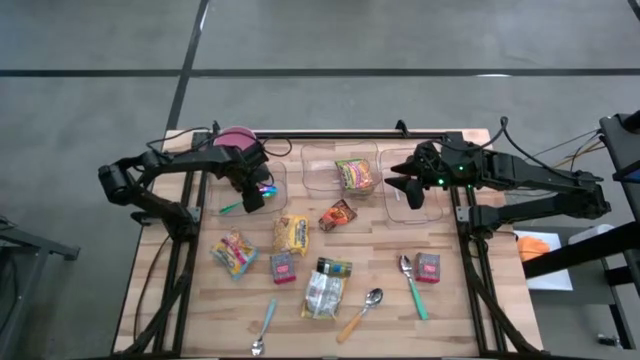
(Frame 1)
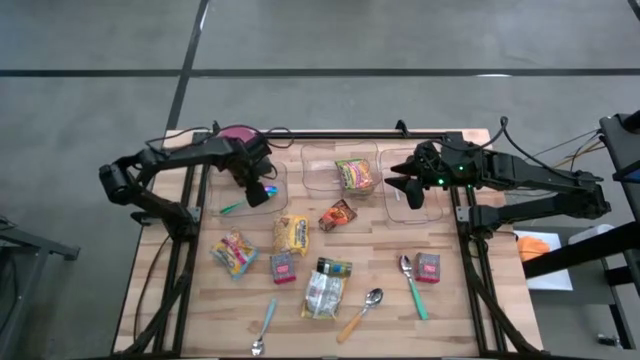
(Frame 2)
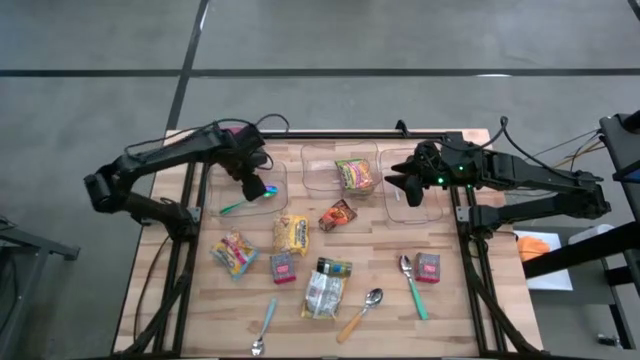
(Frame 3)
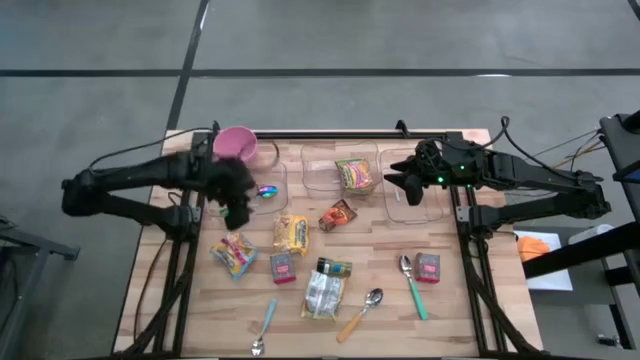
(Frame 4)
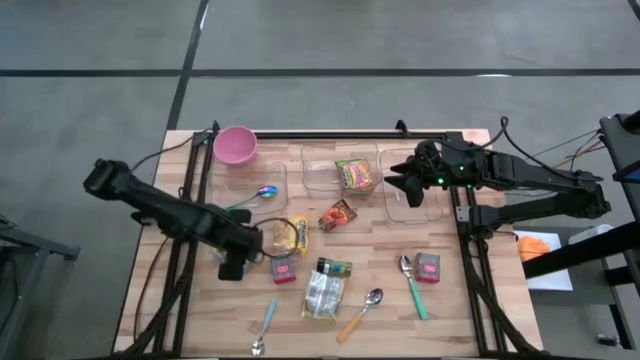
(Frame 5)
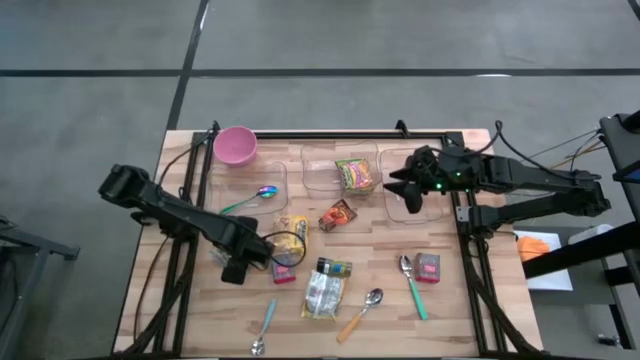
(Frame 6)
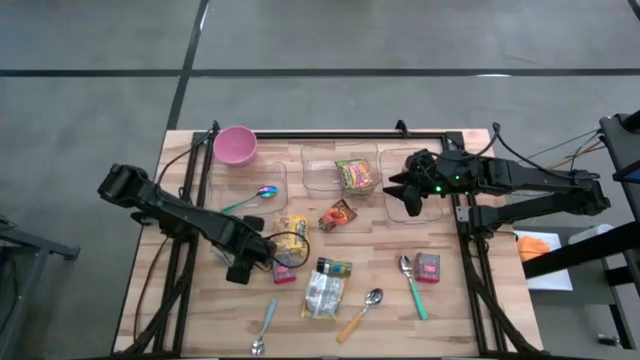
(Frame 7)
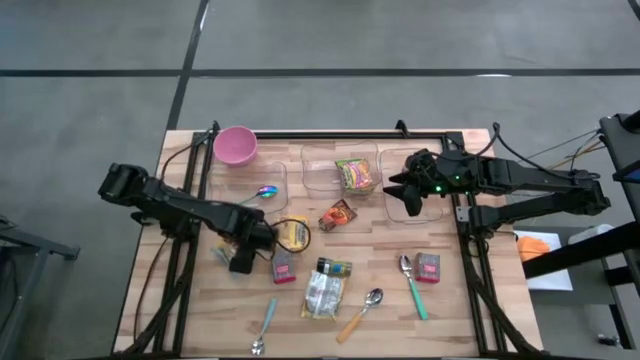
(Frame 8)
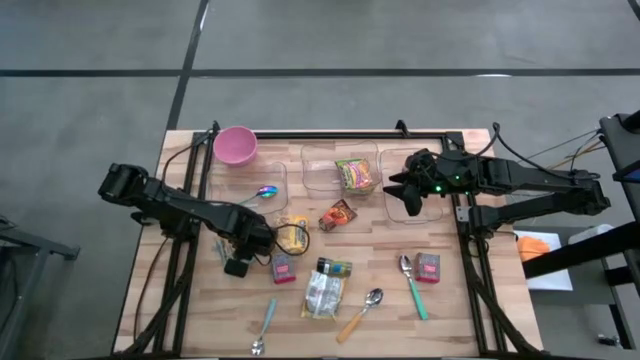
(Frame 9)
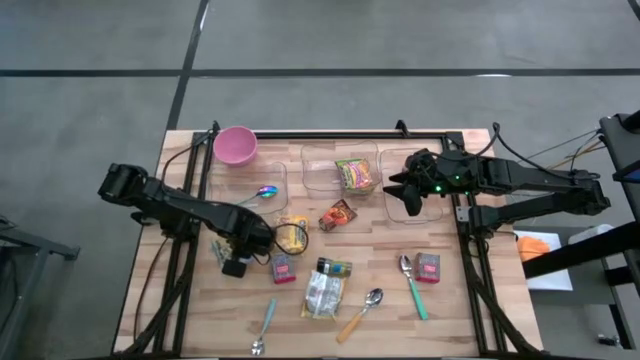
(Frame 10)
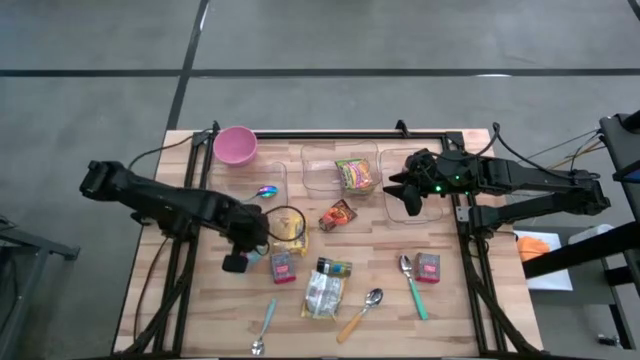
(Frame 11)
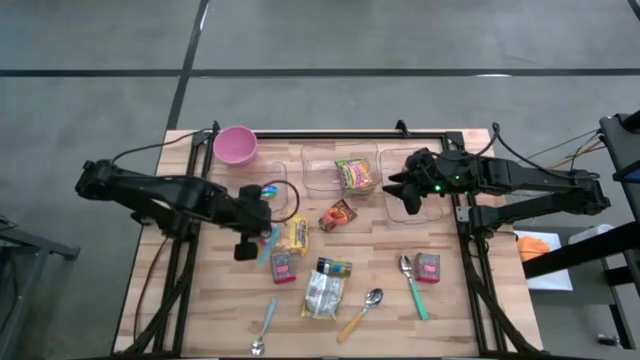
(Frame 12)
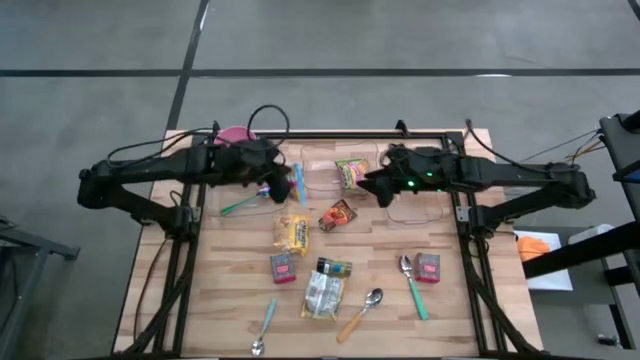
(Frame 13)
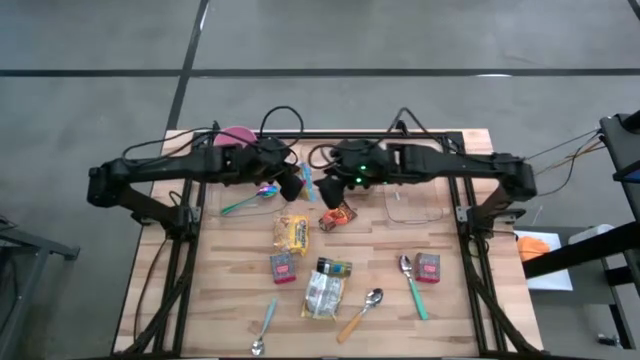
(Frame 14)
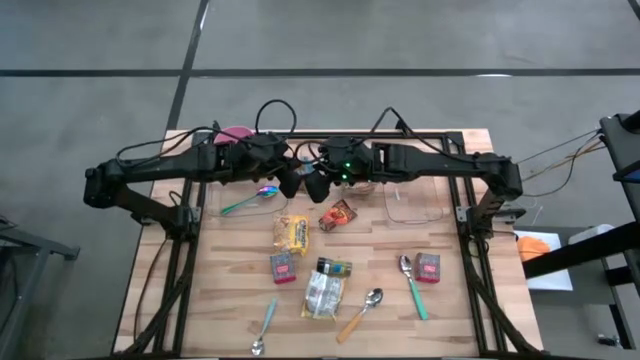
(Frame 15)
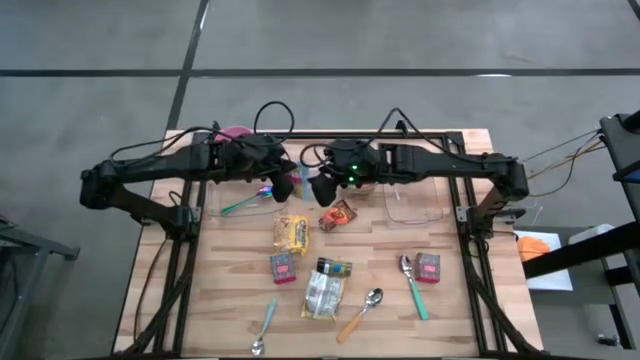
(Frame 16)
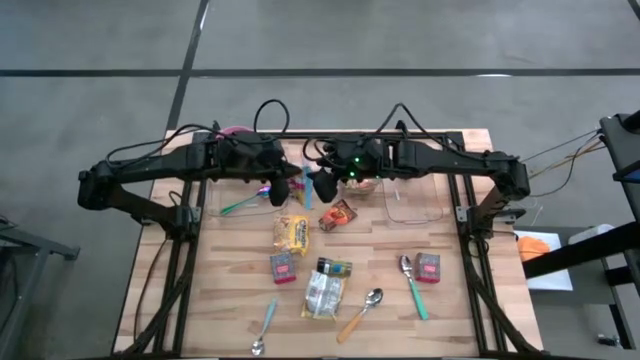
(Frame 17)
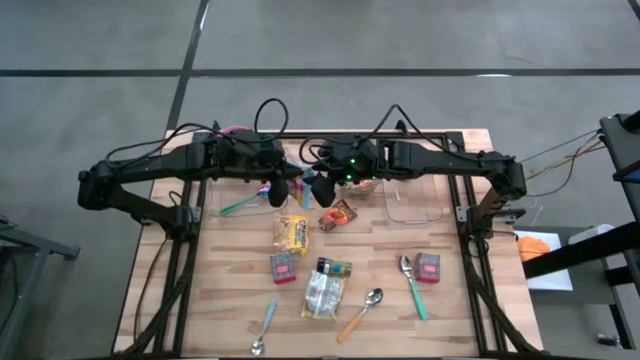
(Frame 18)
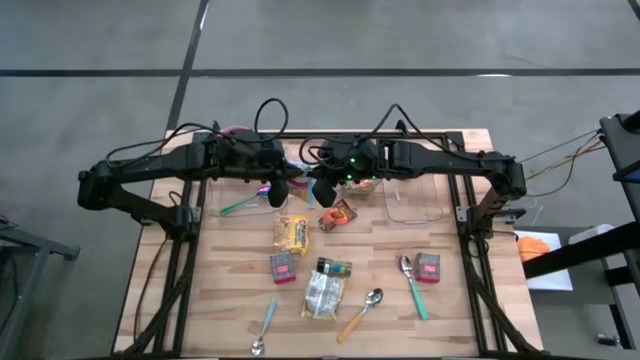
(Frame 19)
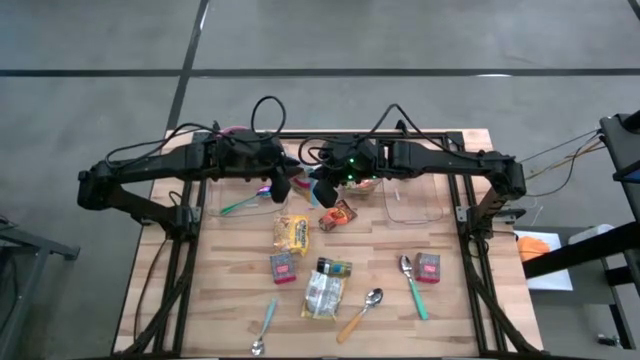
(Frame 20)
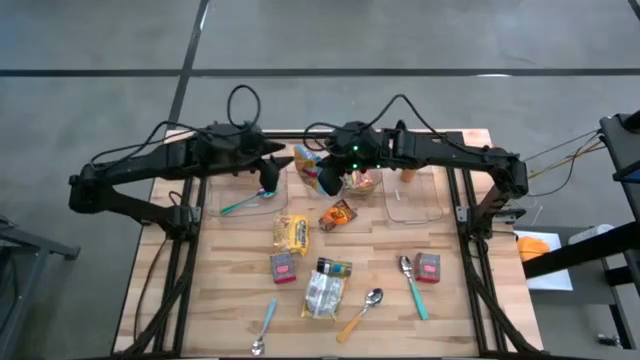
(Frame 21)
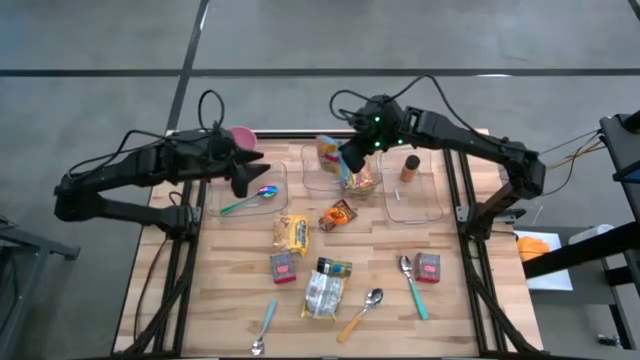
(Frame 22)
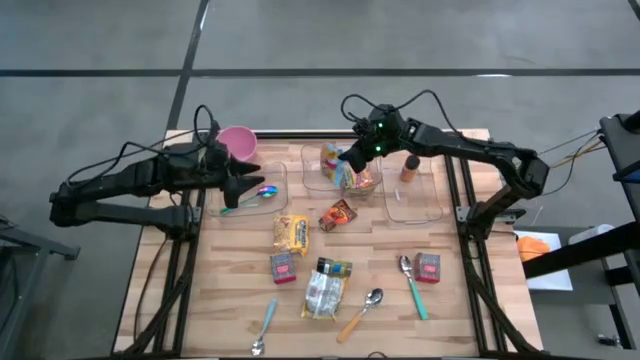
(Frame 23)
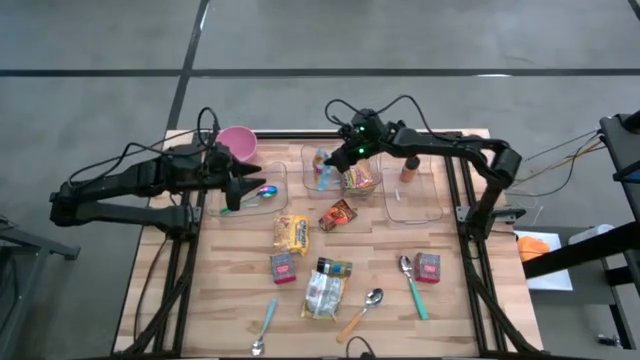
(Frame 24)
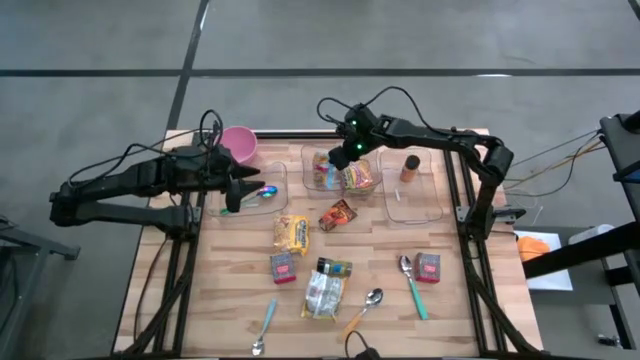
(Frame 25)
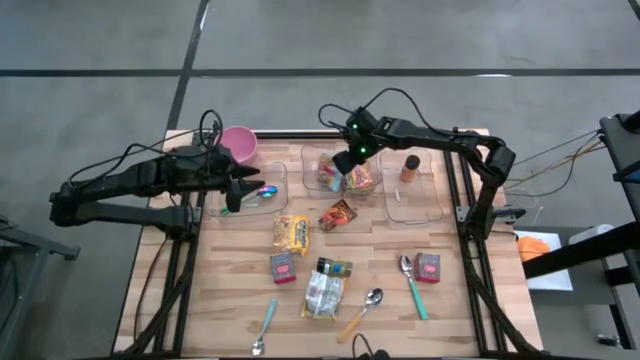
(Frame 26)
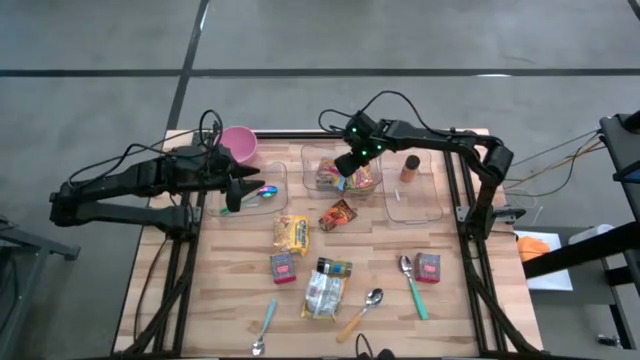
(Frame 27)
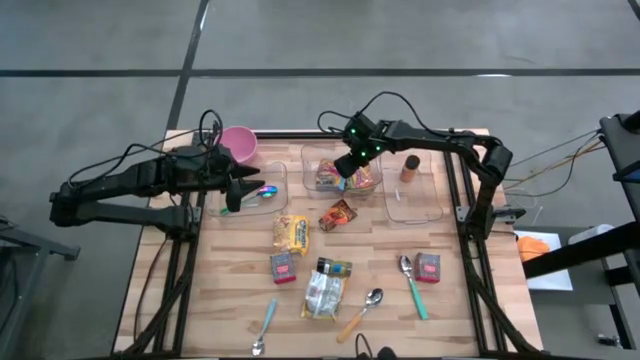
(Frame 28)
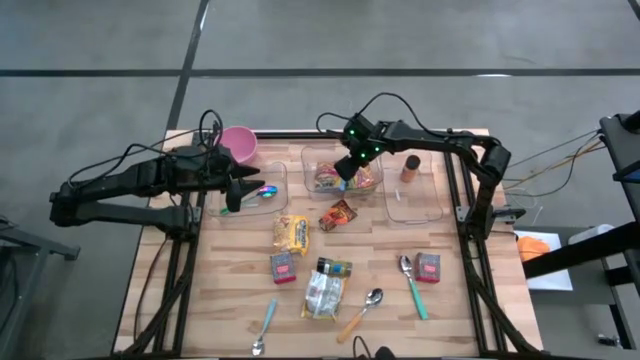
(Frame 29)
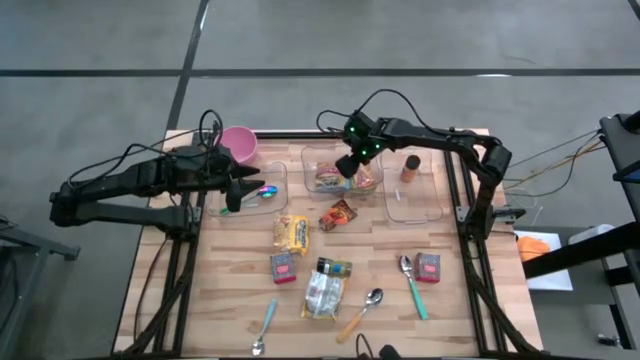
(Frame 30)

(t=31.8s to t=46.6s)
Put the blue noodle pack into the middle transparent bin

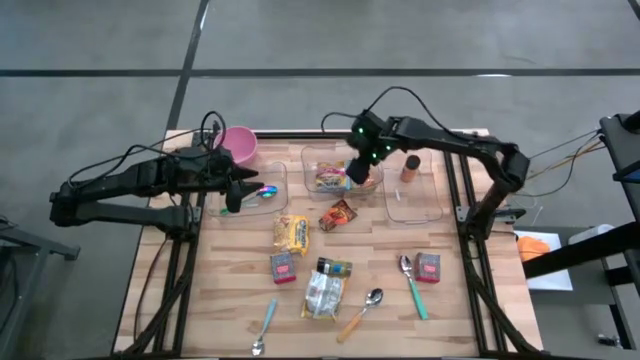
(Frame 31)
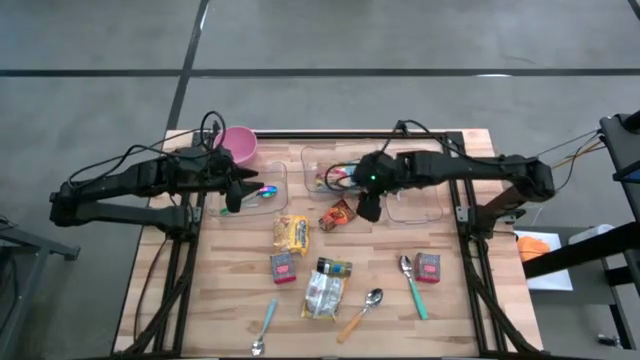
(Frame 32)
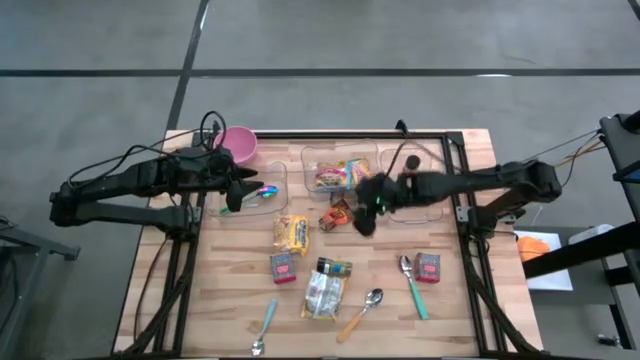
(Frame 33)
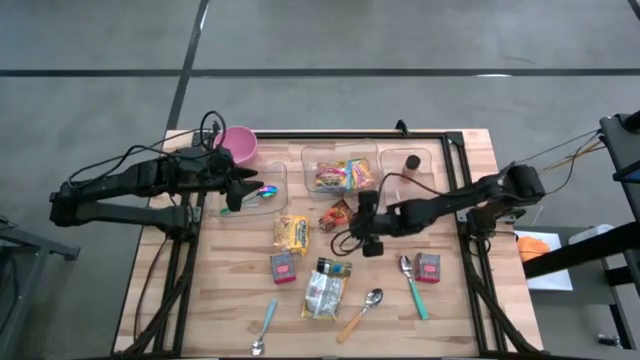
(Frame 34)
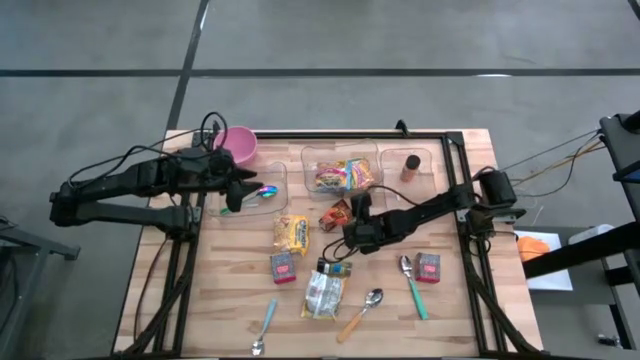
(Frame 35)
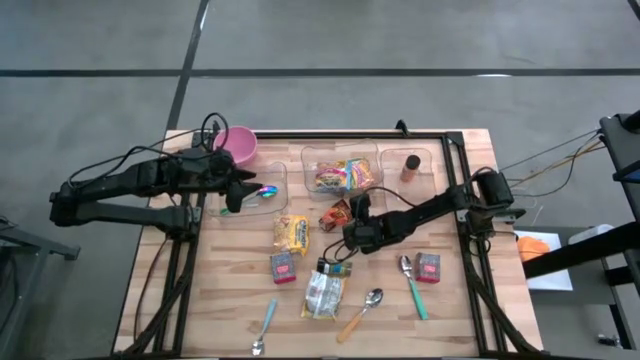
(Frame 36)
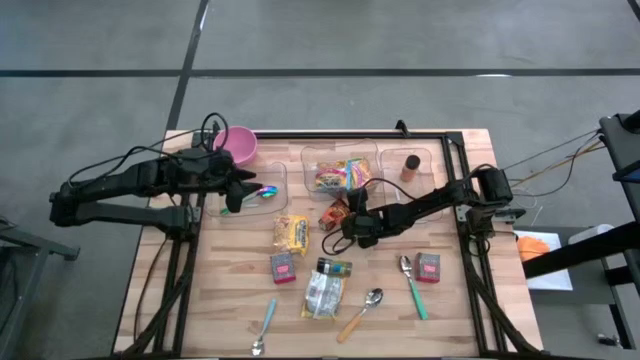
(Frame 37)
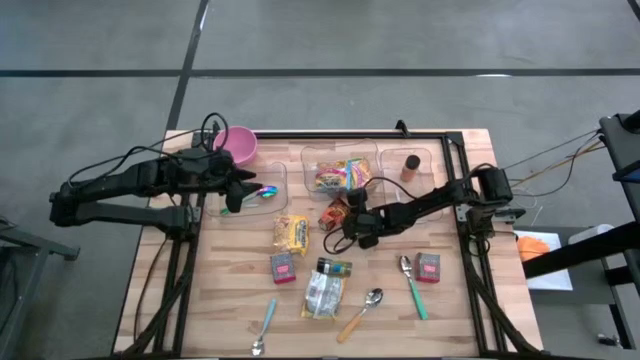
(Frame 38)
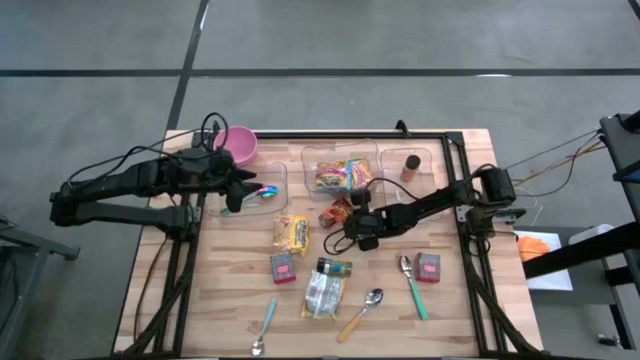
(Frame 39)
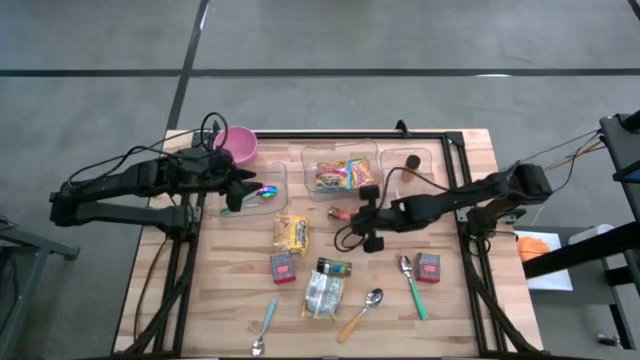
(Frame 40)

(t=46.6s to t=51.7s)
Put the orange seasoning pack into the right transparent bin
